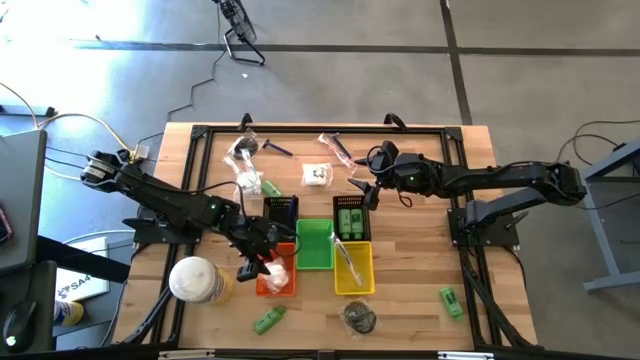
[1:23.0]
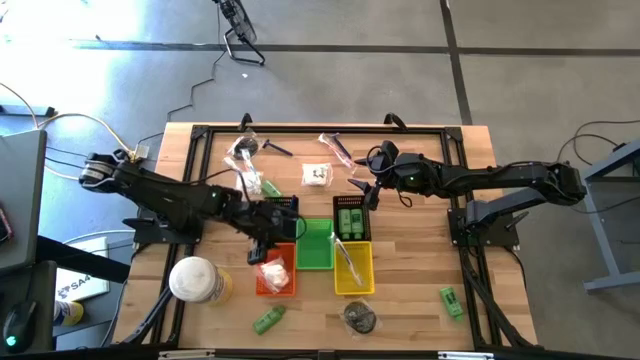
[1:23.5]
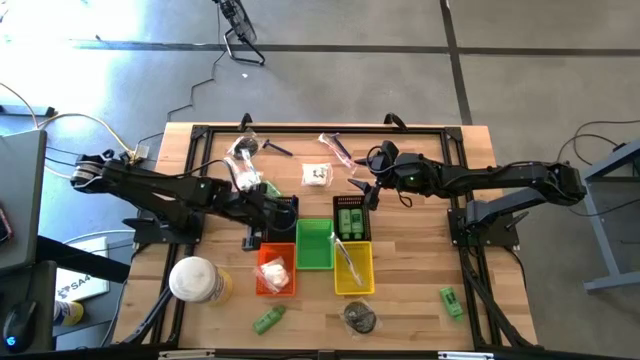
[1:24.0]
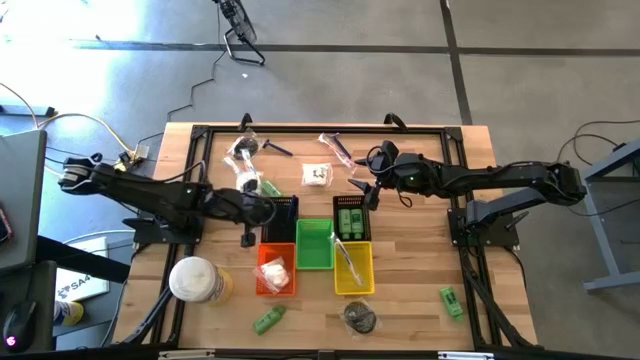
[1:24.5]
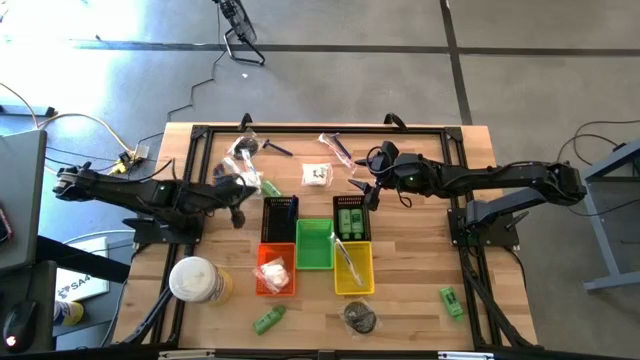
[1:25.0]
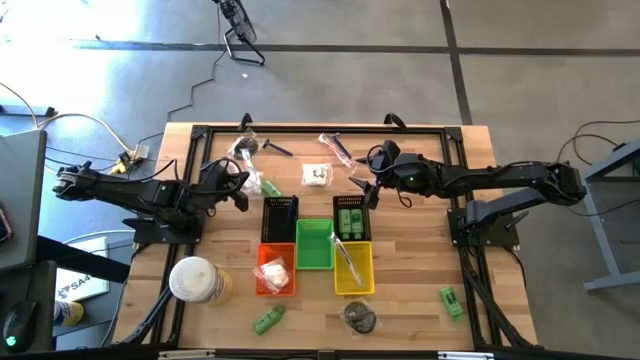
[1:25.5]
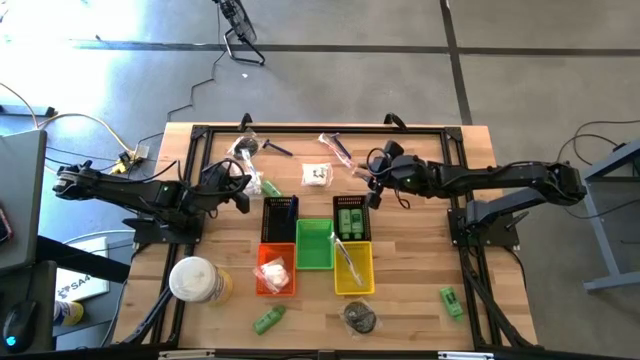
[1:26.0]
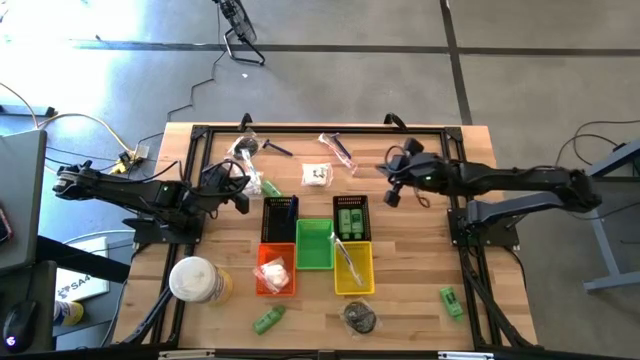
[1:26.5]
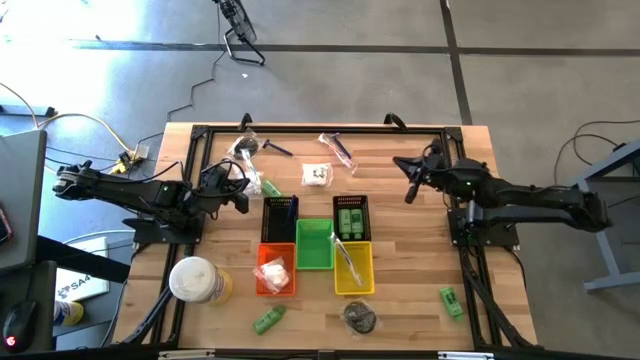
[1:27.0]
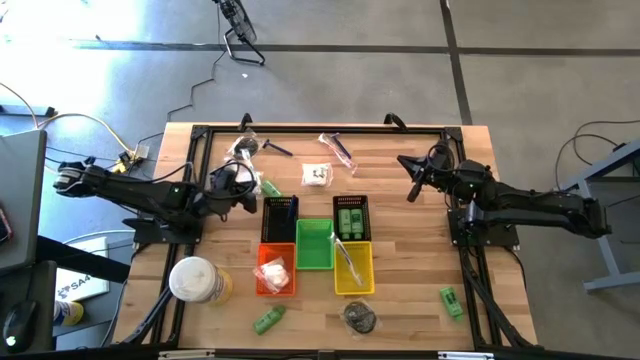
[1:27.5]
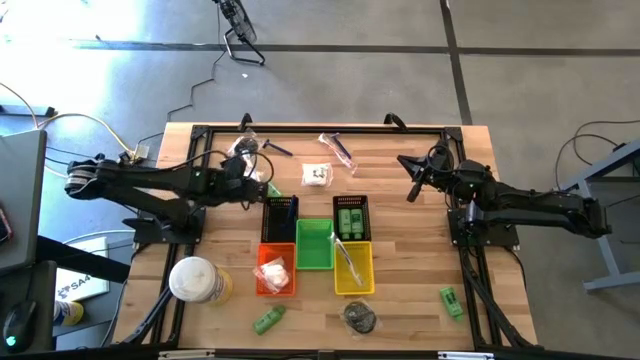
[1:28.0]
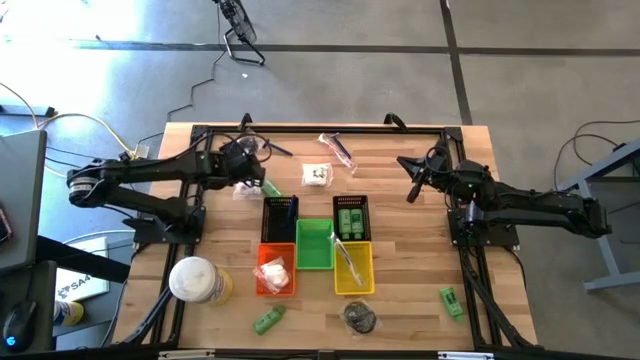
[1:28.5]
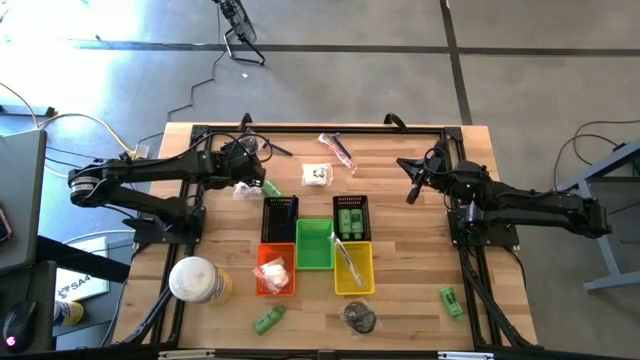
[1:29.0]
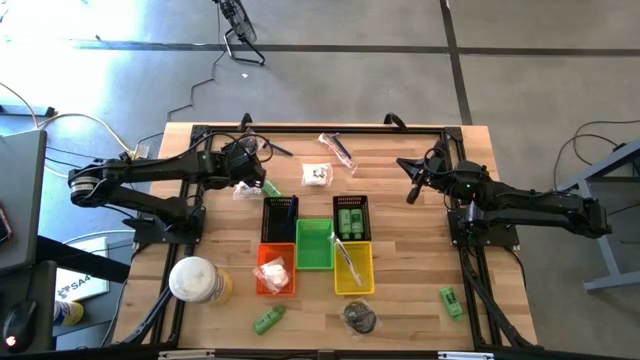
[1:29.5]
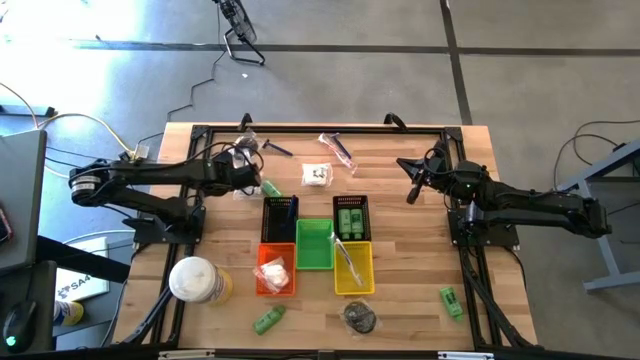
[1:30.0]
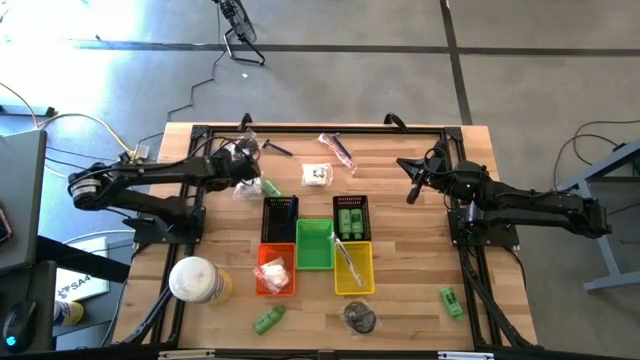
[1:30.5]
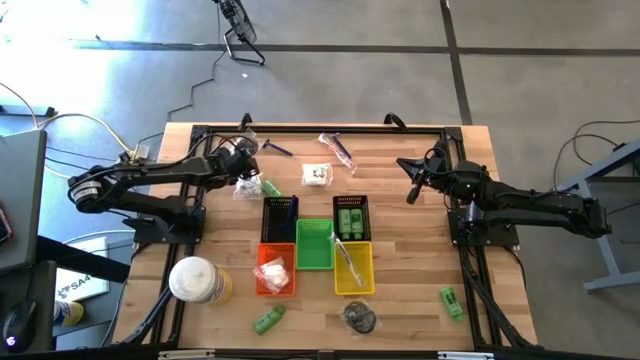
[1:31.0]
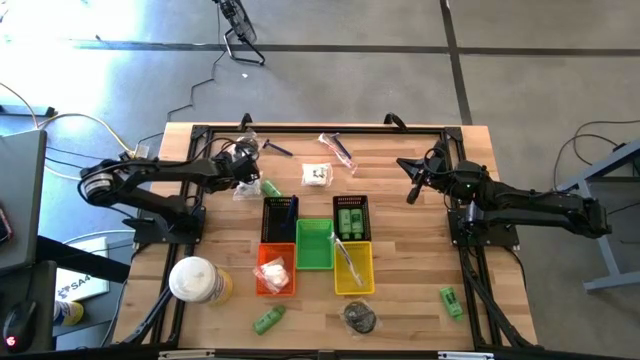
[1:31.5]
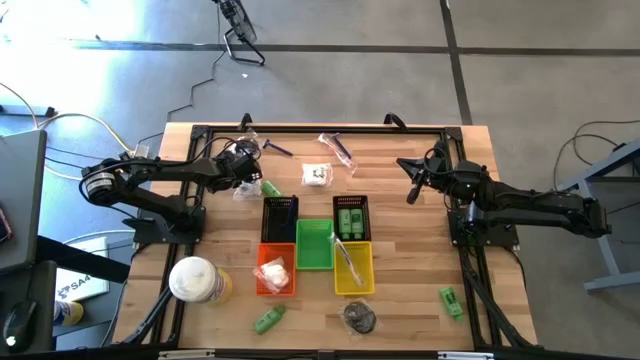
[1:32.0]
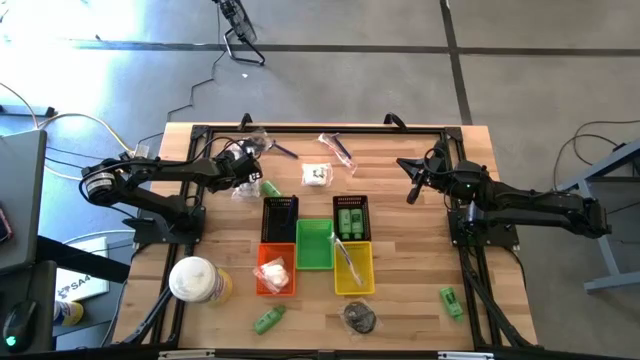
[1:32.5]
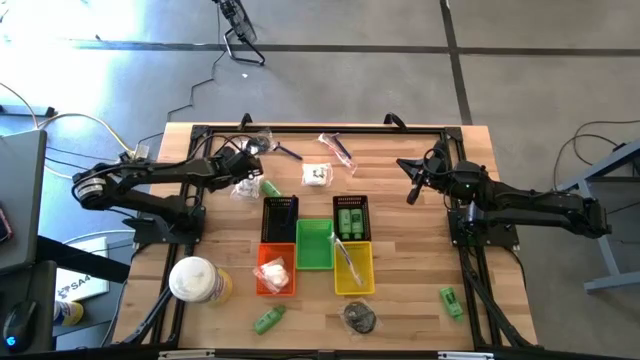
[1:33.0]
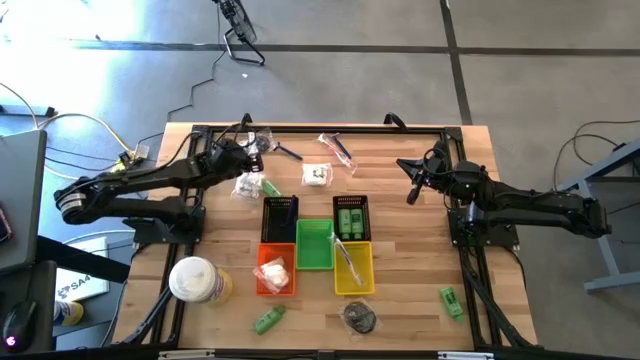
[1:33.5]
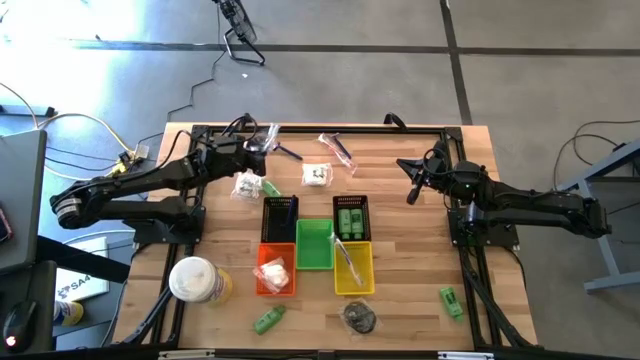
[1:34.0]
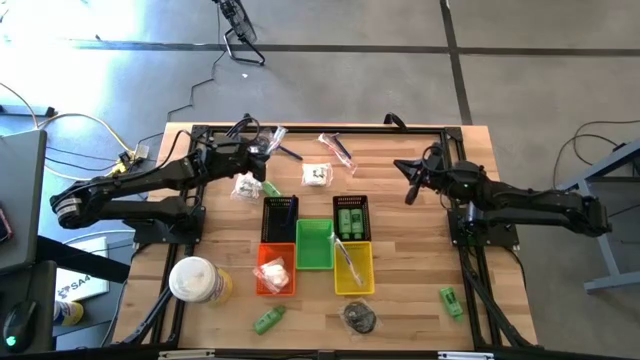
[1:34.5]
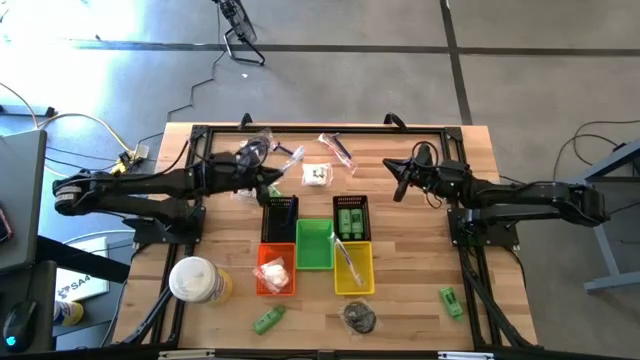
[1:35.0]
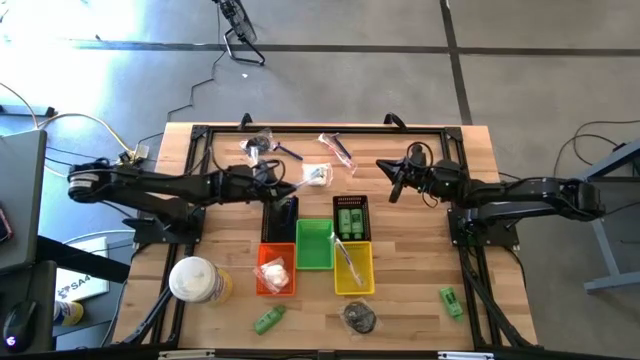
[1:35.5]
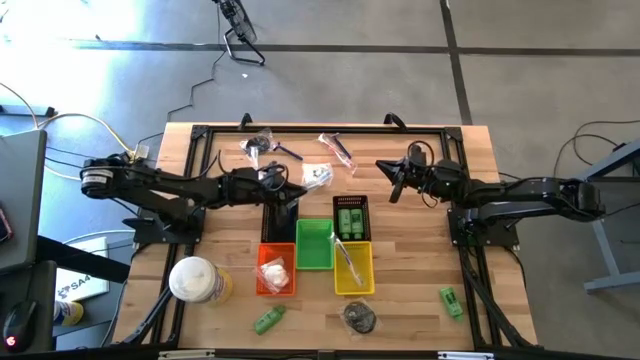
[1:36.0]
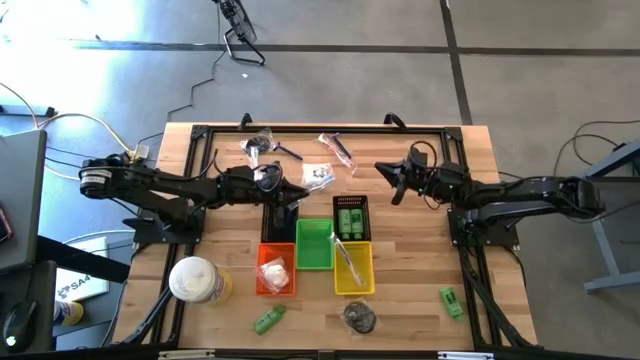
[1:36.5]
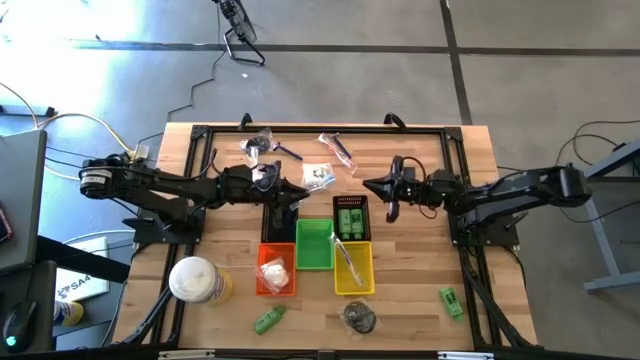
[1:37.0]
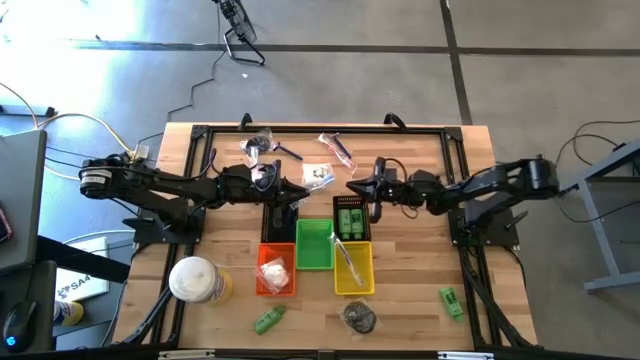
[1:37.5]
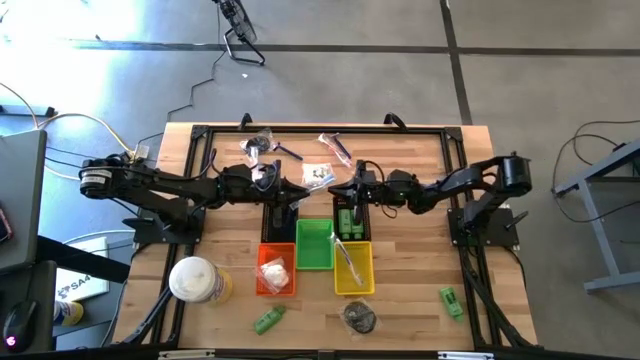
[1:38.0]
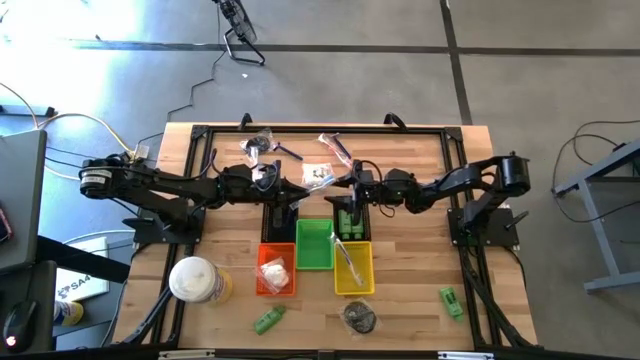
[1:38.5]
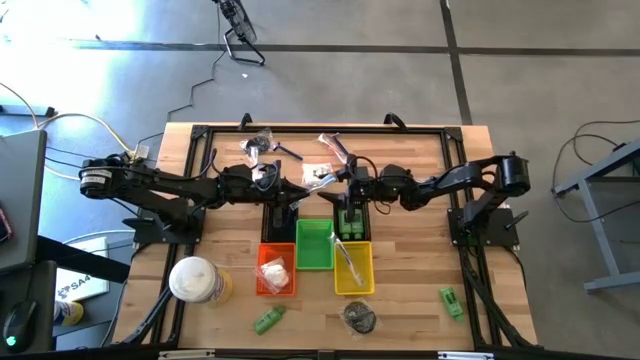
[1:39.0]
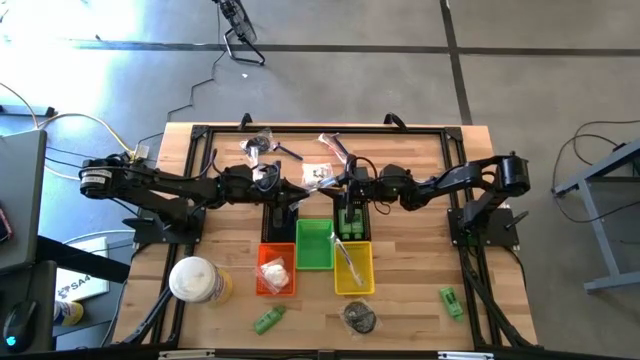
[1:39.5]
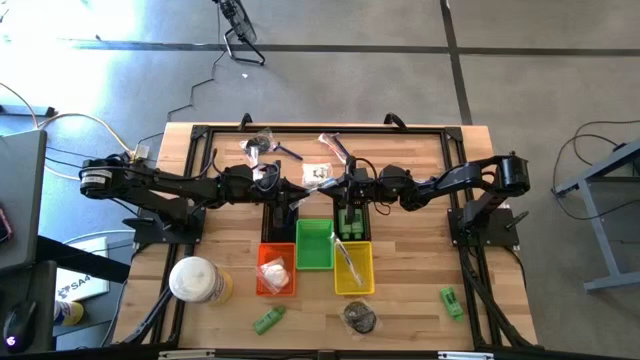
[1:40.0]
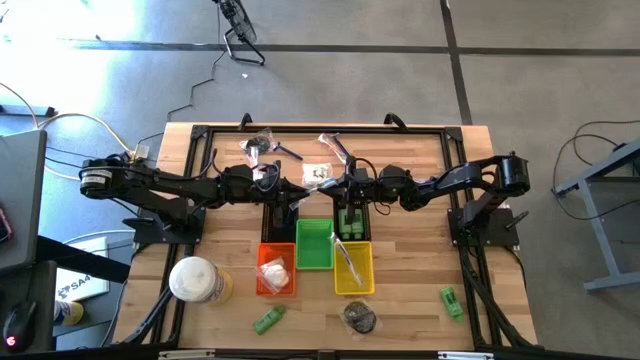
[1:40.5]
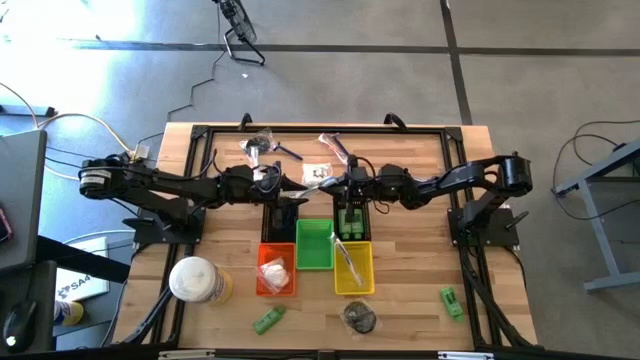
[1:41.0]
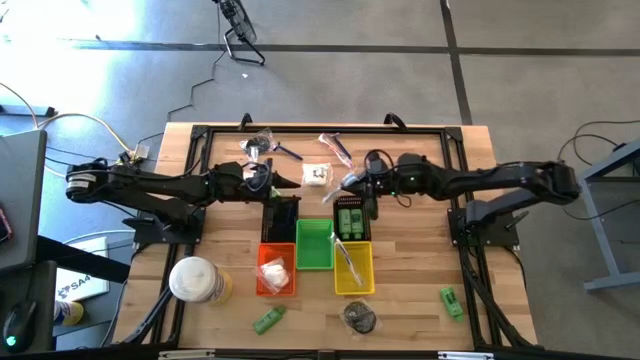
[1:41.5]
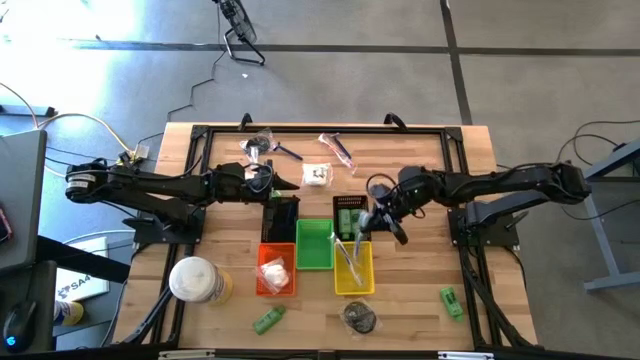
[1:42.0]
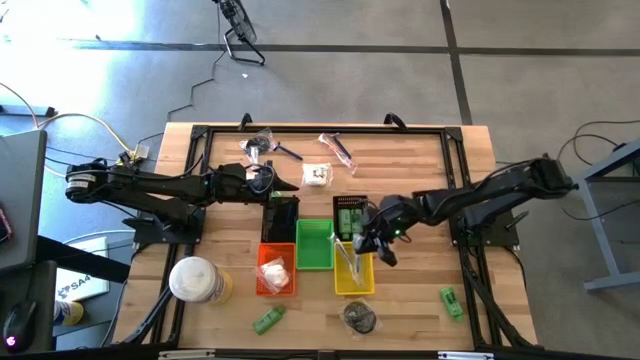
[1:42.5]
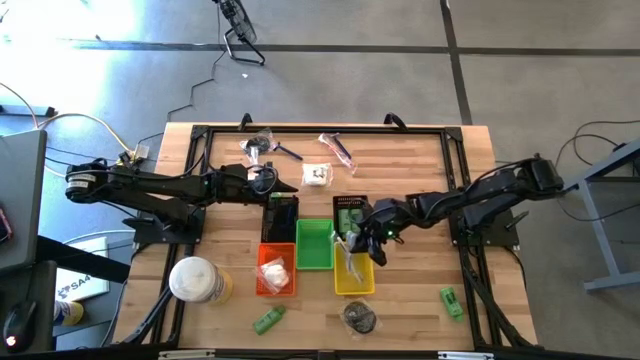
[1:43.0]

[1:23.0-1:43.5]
Task: Pick & Place Travel size toiletries
Put the blue toothbrush into the yellow bin
